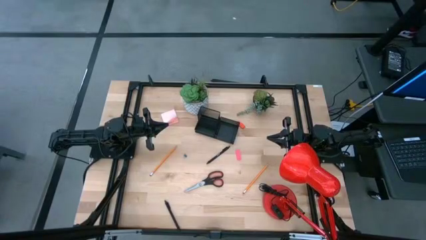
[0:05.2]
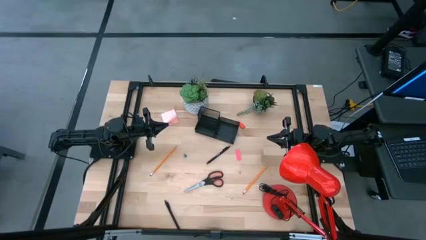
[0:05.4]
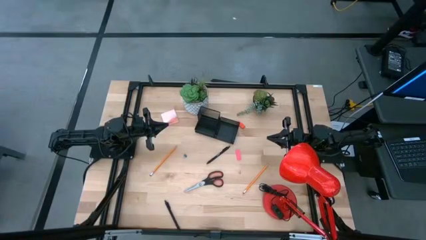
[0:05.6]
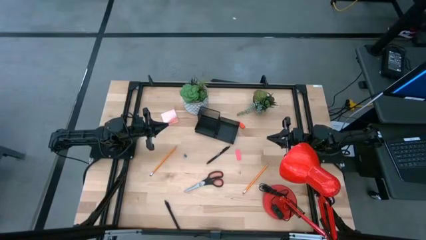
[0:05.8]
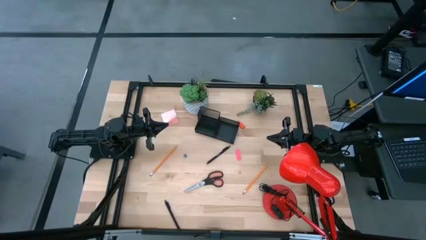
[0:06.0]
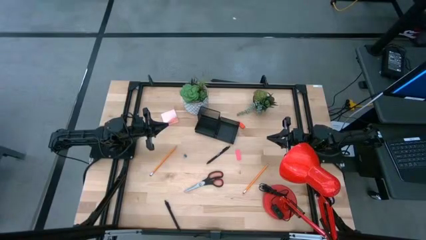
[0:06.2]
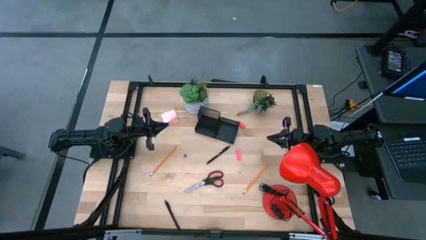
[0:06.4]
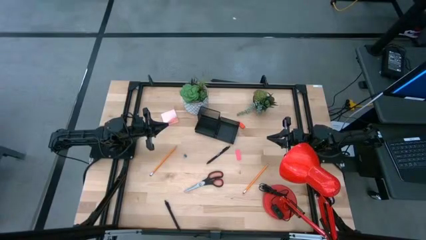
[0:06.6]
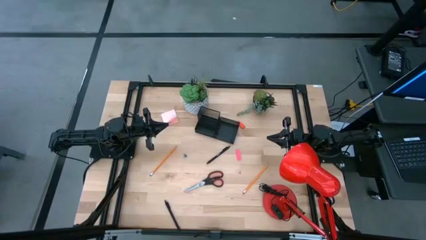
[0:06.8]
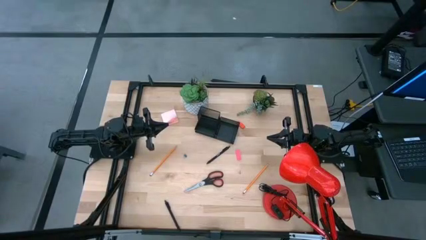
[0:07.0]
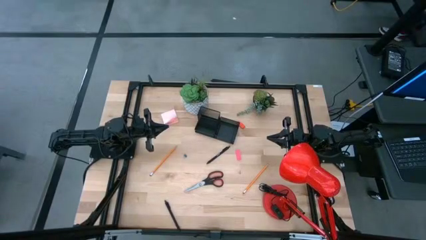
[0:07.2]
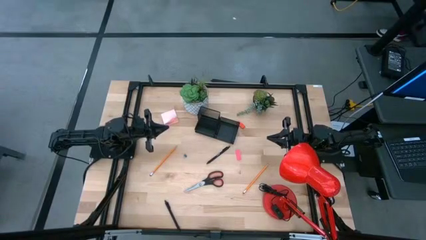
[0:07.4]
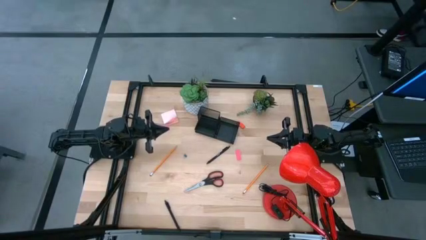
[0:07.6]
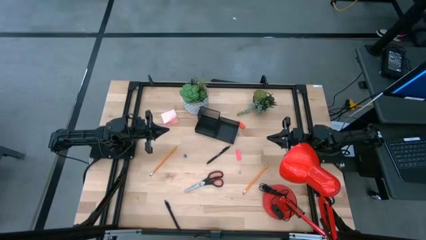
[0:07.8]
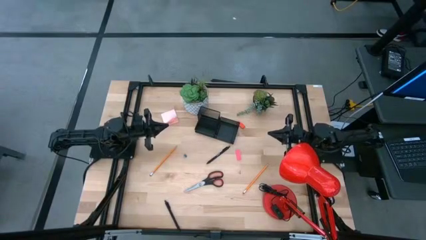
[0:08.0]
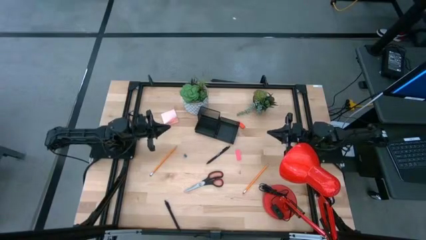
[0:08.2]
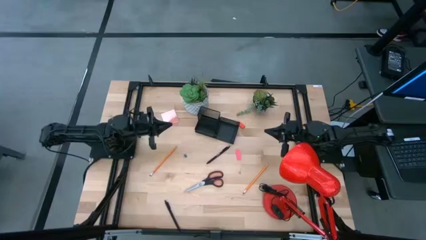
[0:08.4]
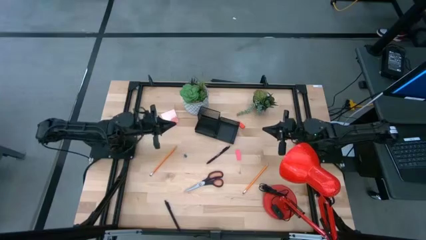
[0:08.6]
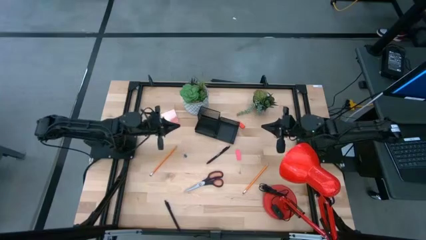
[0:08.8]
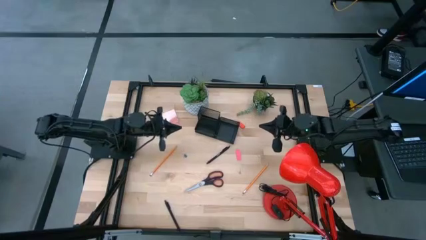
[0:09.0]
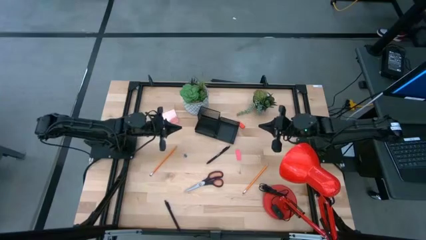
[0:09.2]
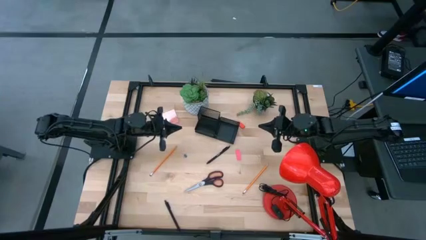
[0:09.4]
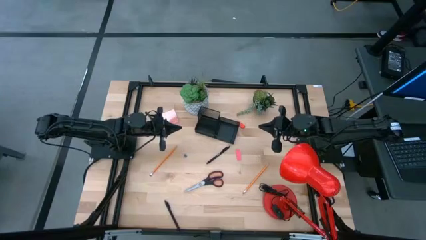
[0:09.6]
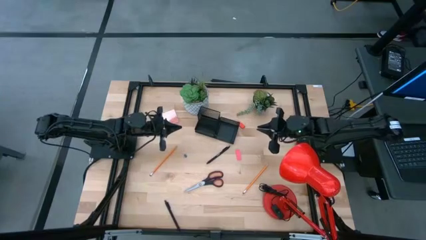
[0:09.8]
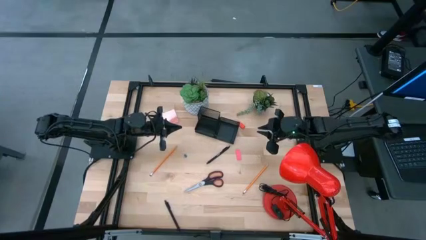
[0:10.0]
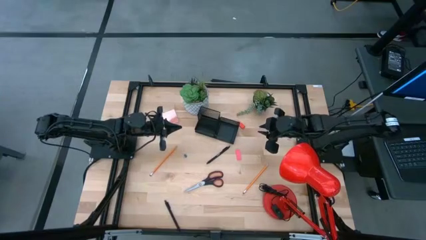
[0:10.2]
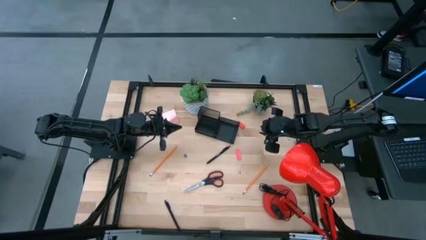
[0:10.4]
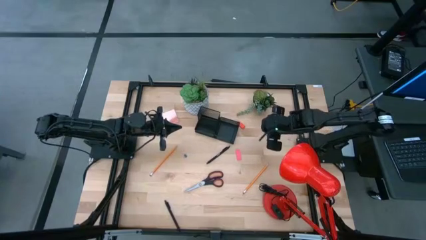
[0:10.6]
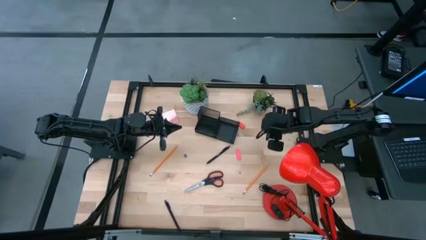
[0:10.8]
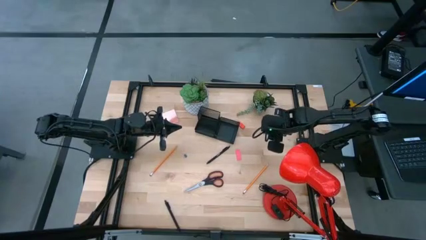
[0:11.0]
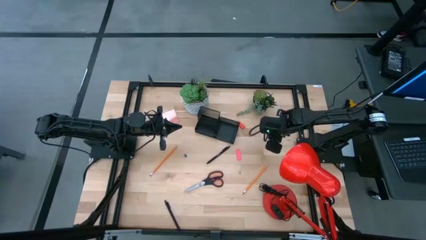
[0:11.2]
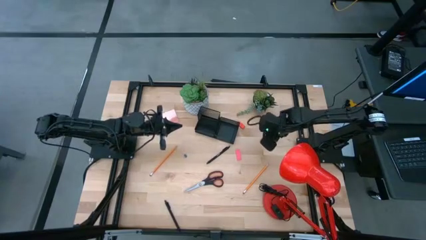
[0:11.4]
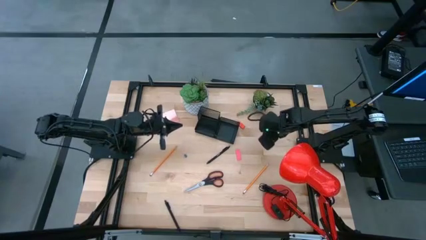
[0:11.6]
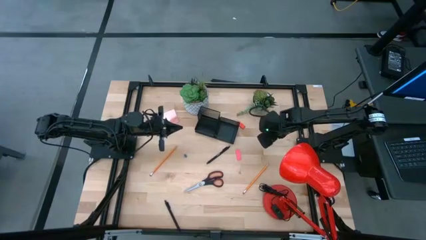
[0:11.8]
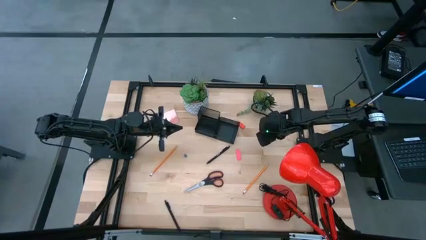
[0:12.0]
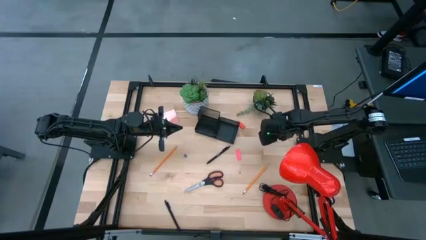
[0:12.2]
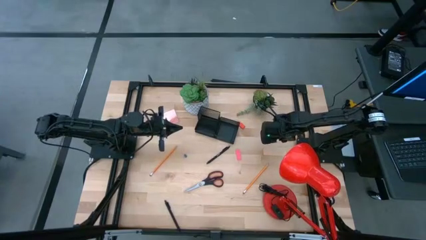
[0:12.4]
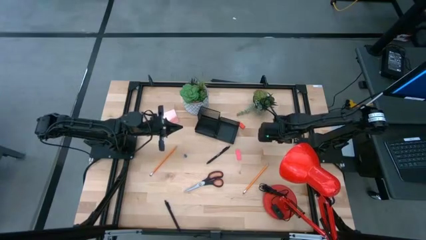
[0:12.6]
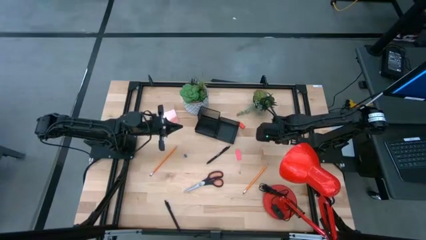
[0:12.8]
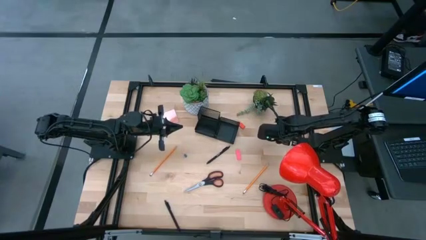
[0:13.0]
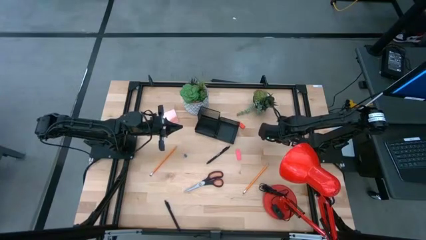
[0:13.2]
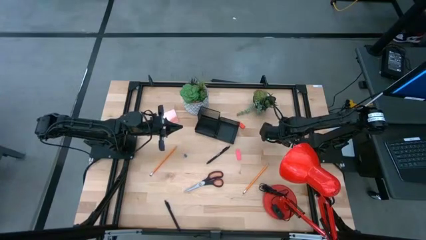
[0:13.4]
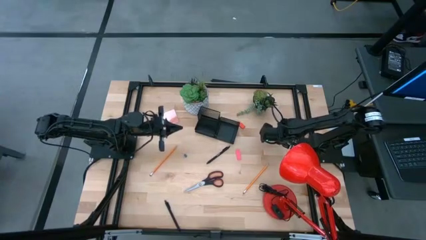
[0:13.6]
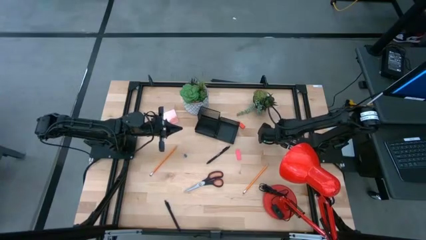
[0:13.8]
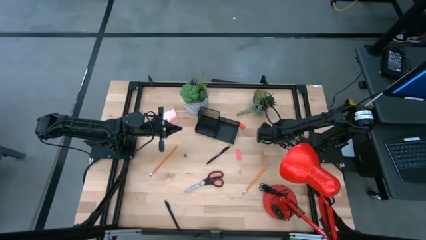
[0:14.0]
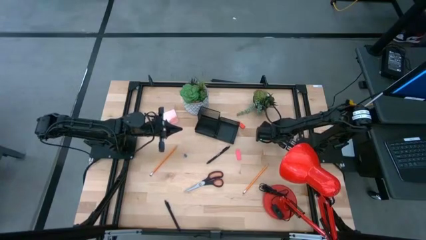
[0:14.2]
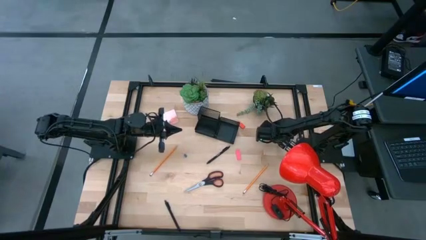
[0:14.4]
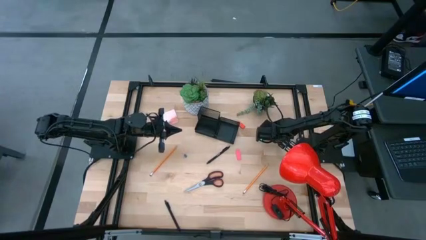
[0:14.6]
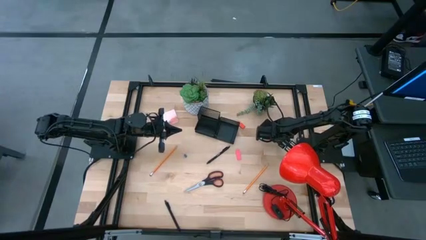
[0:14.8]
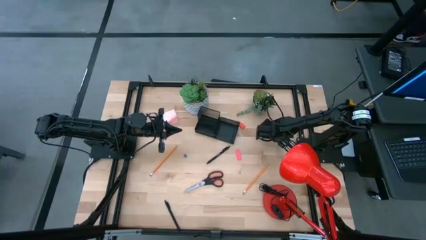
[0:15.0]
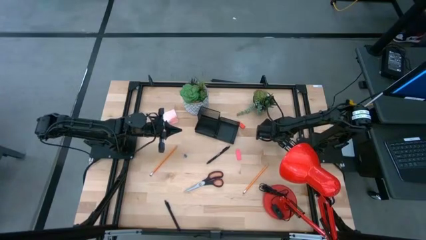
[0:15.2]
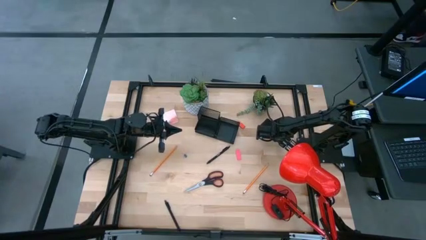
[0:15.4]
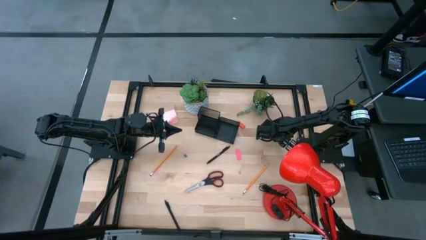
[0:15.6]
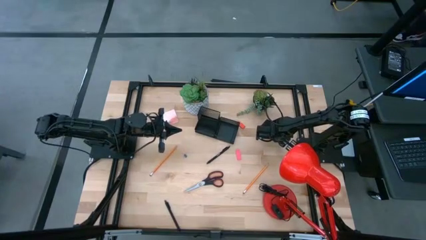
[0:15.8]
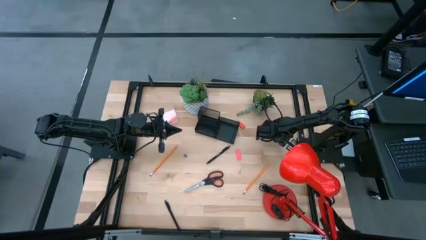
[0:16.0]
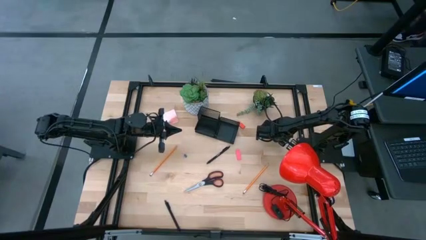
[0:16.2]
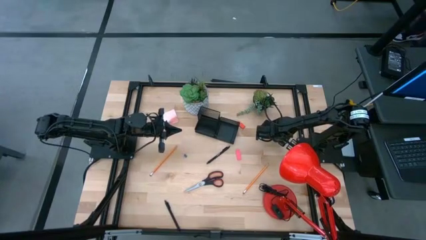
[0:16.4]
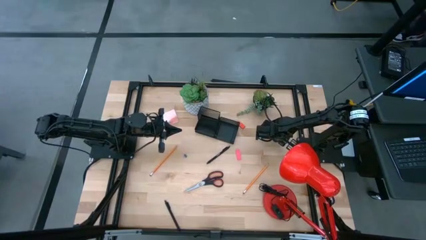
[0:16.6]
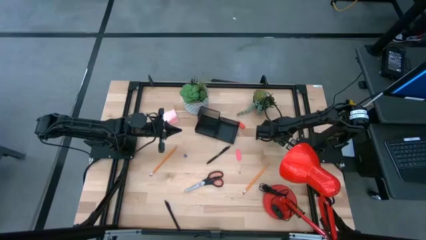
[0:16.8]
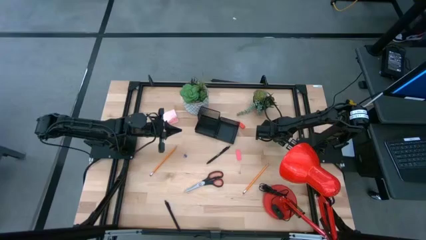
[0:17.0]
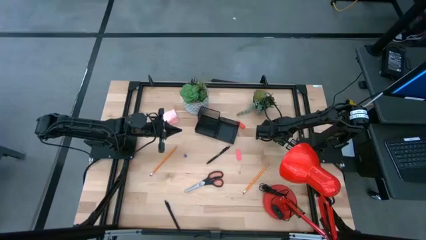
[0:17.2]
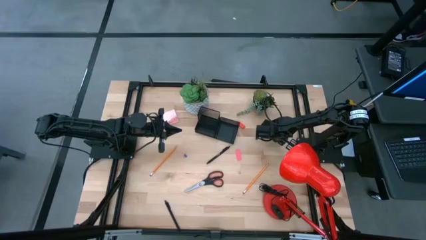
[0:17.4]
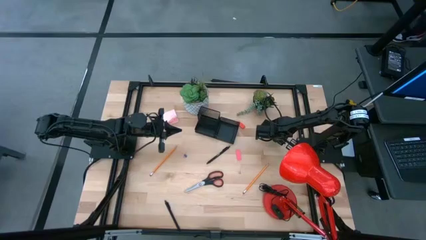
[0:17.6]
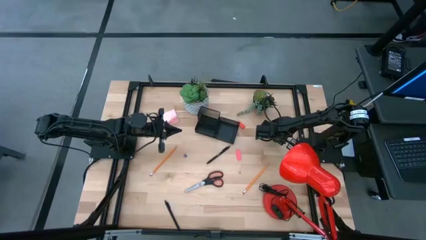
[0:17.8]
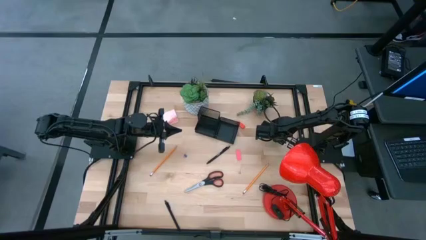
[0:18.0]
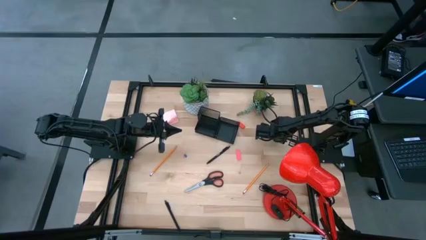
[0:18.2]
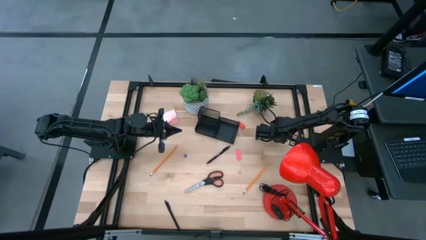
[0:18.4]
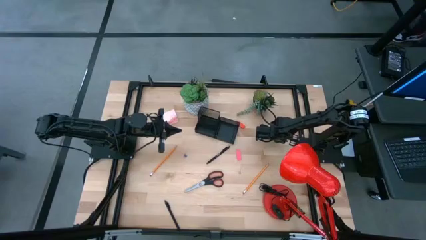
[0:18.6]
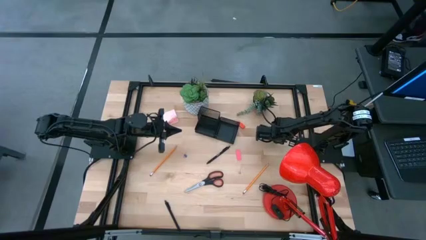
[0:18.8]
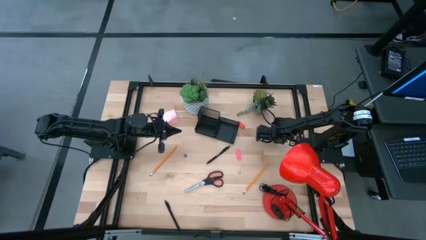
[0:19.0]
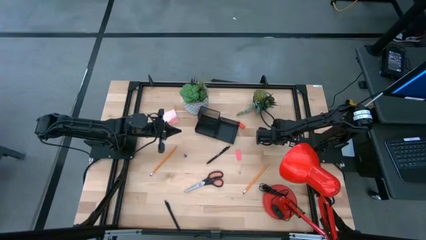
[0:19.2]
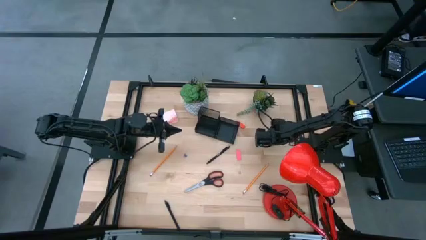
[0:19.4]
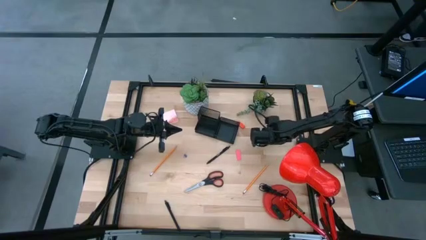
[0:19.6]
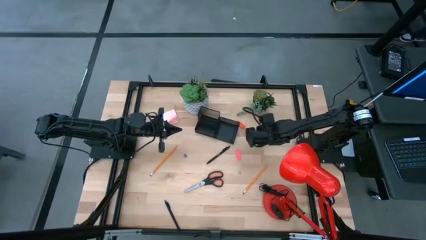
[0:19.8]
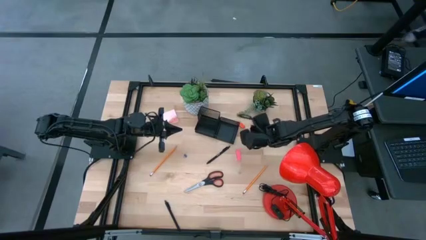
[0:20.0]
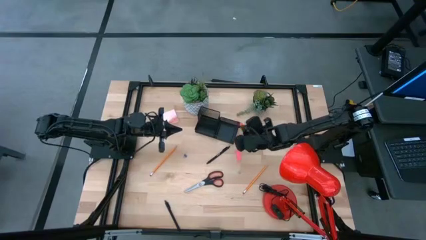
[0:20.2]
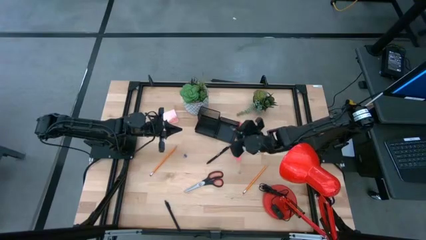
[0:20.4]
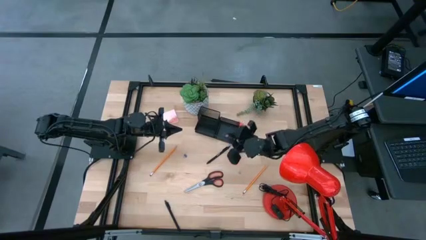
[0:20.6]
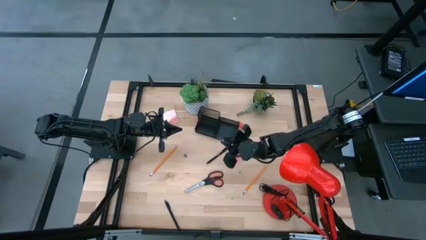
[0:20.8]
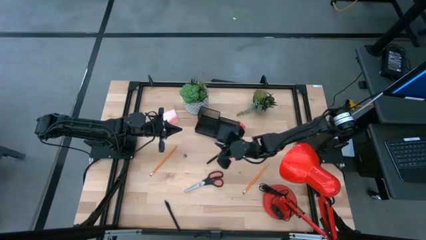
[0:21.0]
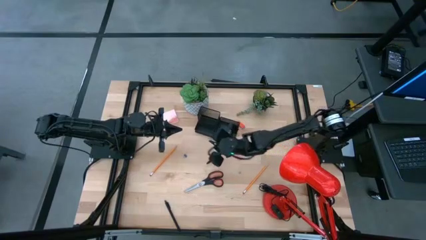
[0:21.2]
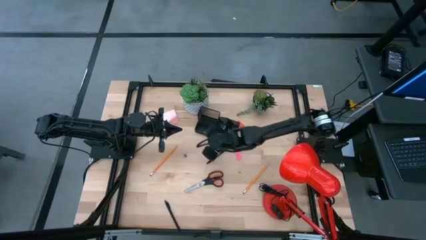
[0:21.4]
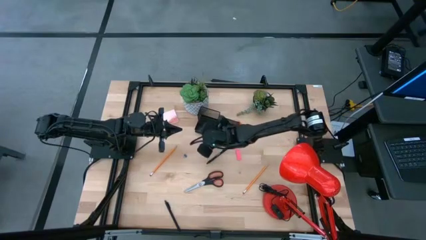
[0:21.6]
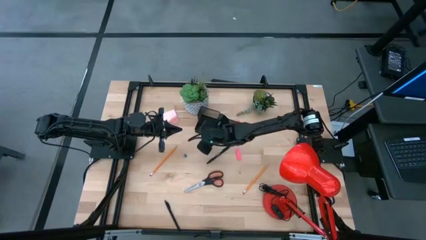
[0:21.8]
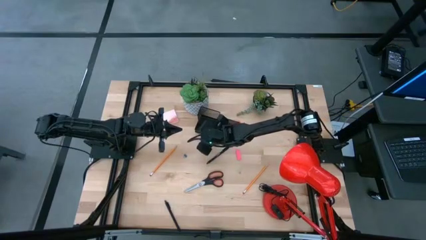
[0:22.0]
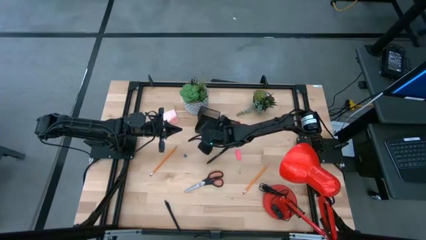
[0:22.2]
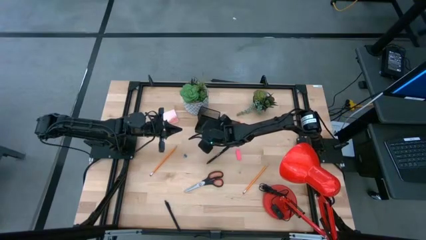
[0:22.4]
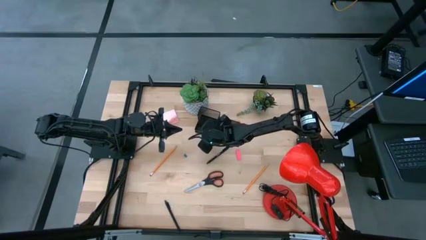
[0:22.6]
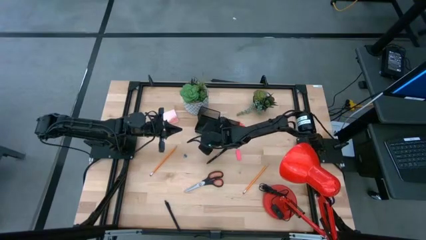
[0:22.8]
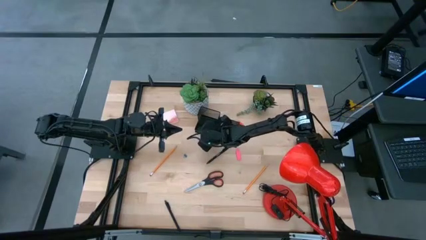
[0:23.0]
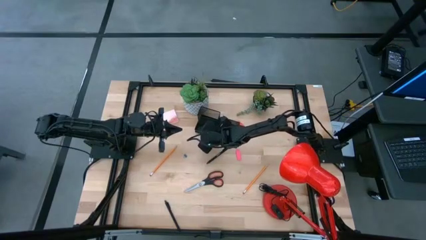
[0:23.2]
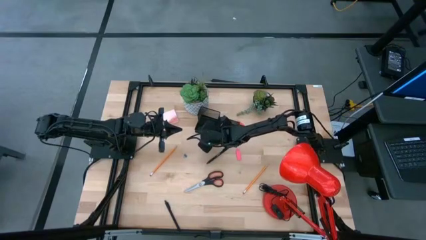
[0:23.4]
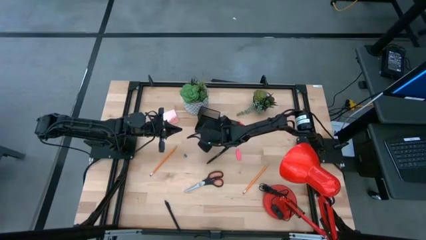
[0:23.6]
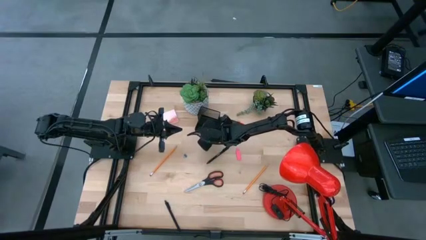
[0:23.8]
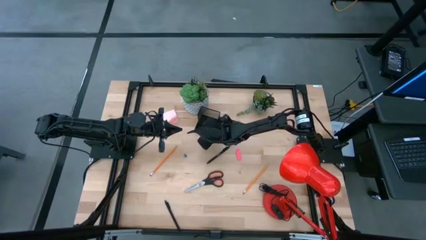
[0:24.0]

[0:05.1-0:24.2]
Task: Pick and place office supplies into organizer
Put the pink binder clip into the black desk organizer
